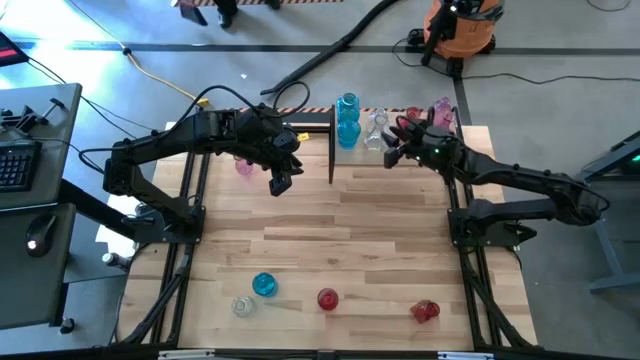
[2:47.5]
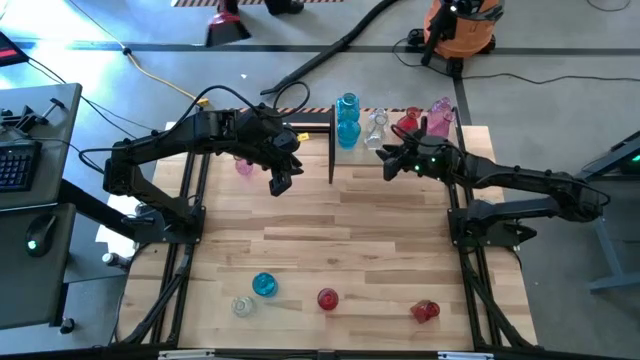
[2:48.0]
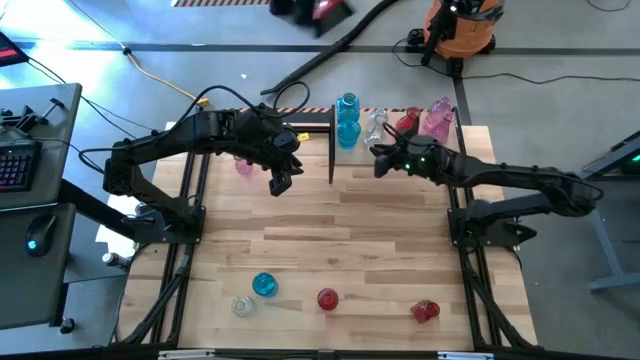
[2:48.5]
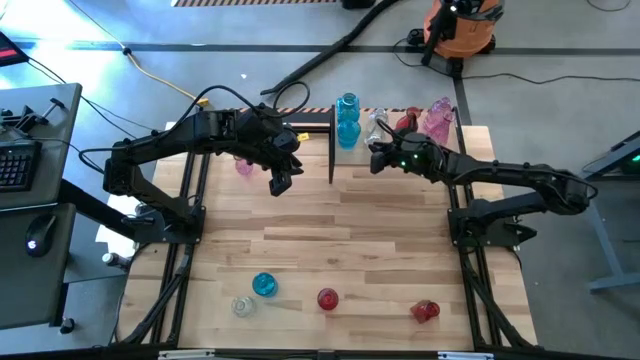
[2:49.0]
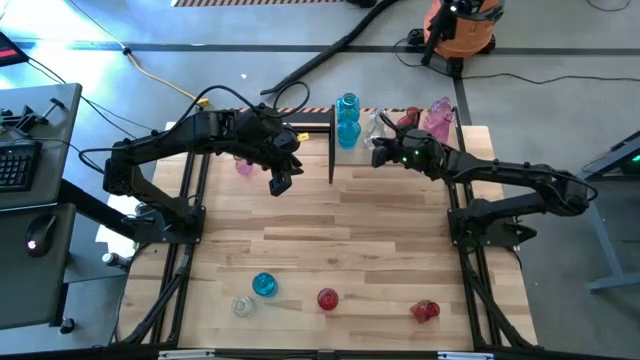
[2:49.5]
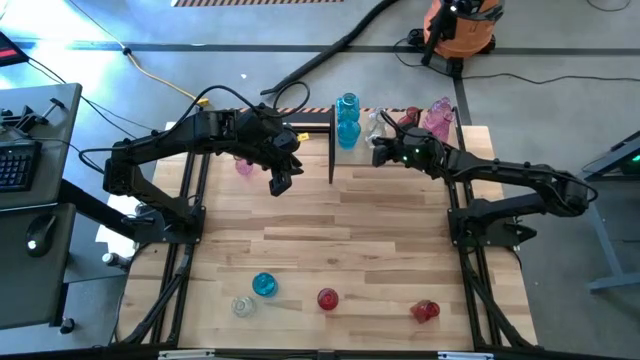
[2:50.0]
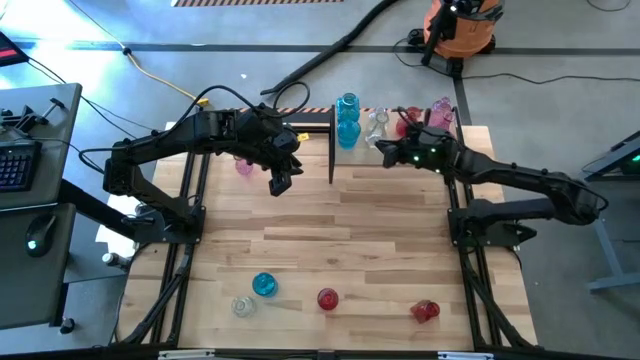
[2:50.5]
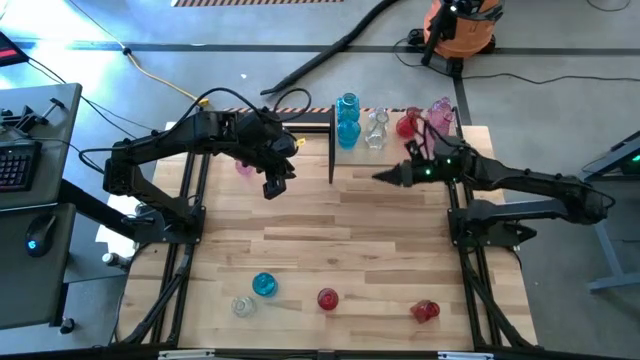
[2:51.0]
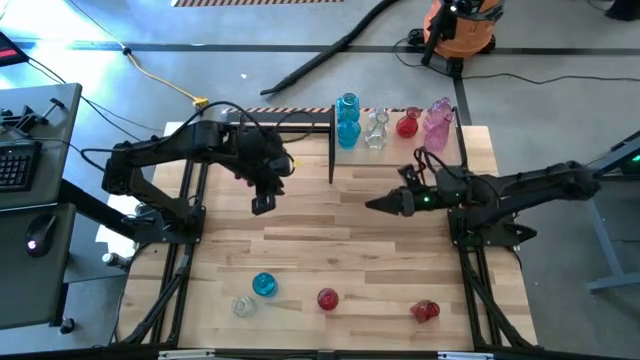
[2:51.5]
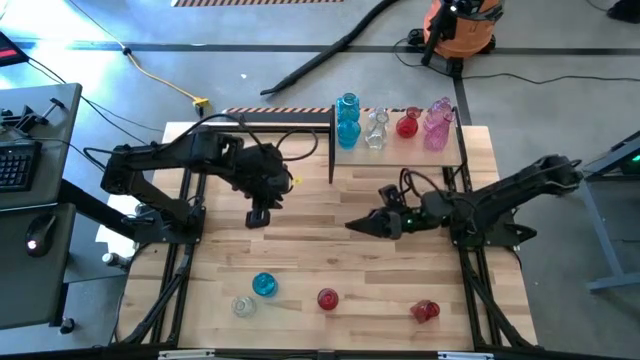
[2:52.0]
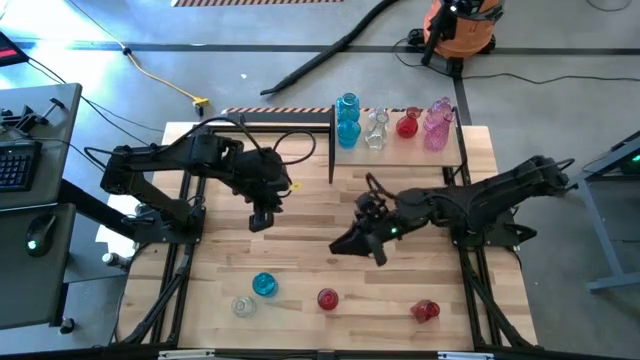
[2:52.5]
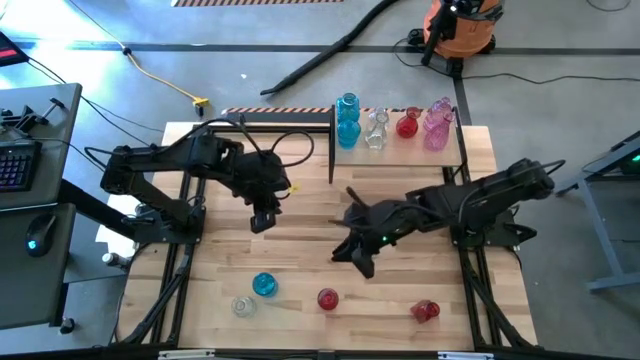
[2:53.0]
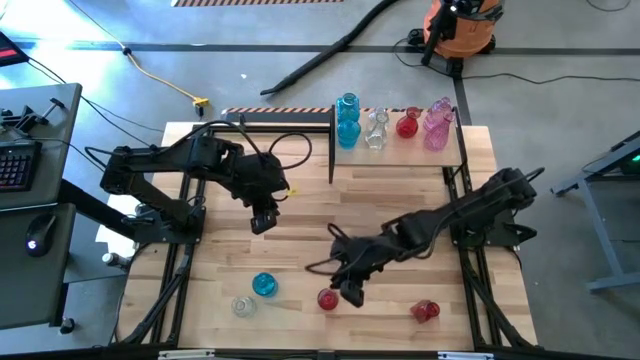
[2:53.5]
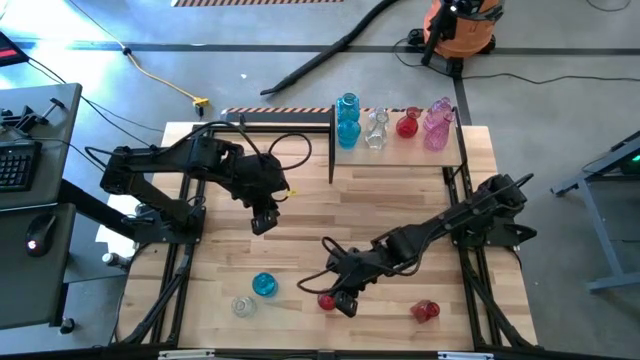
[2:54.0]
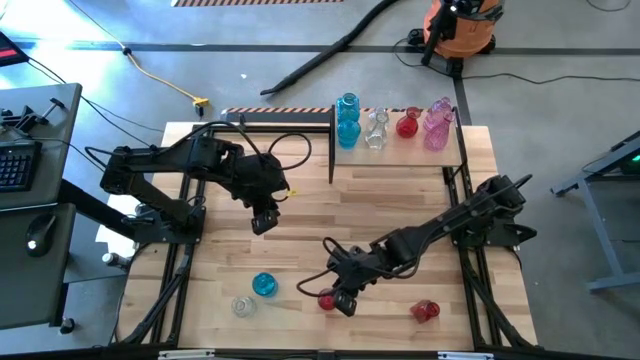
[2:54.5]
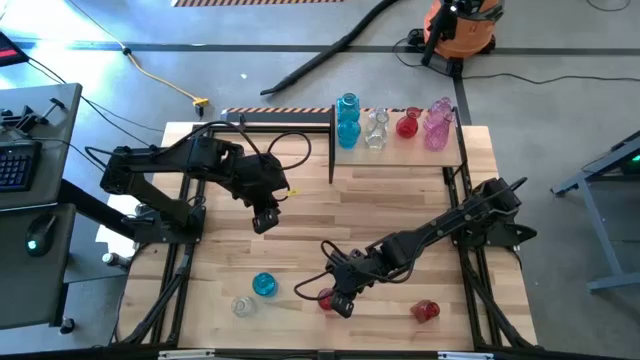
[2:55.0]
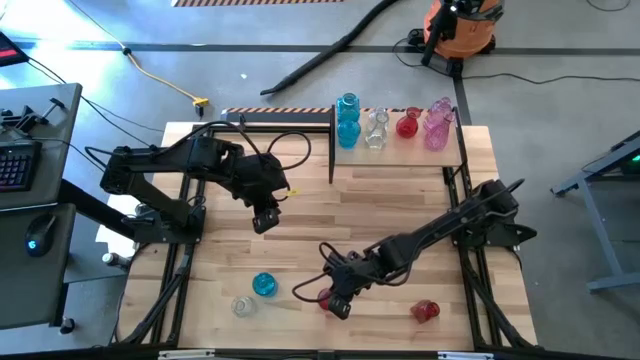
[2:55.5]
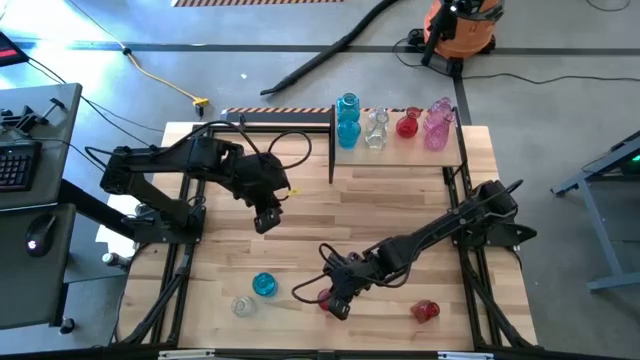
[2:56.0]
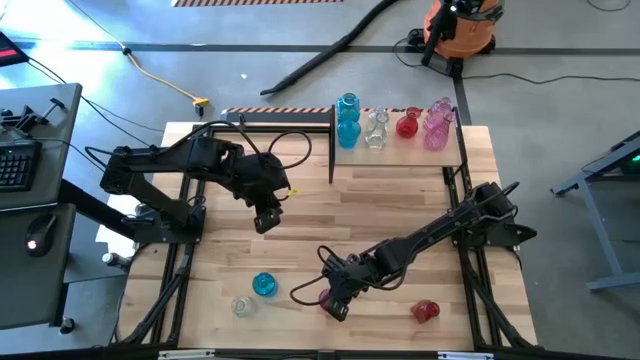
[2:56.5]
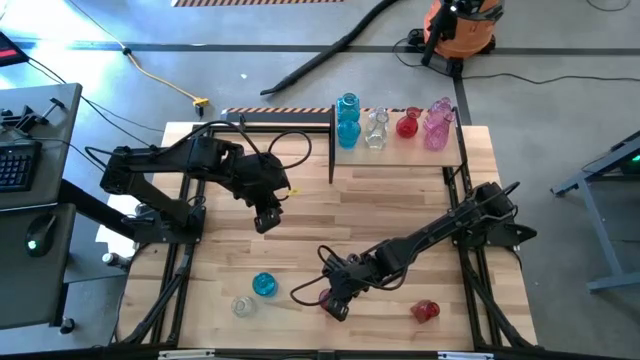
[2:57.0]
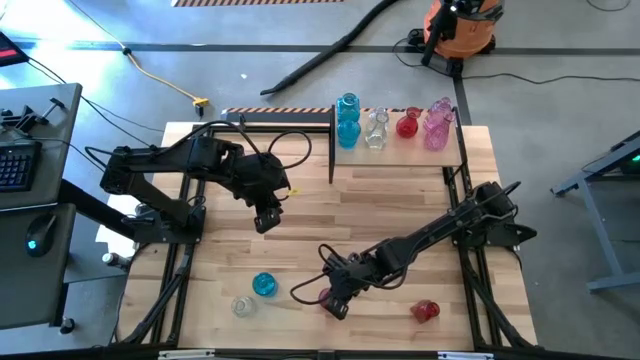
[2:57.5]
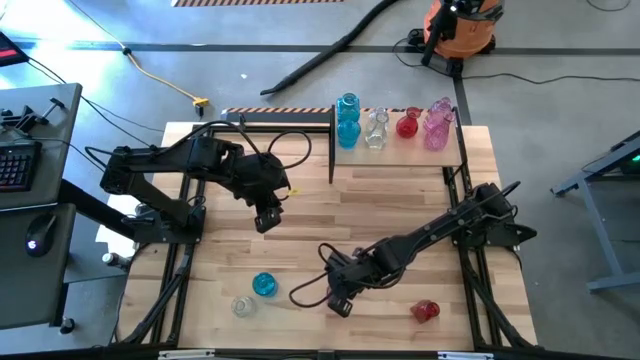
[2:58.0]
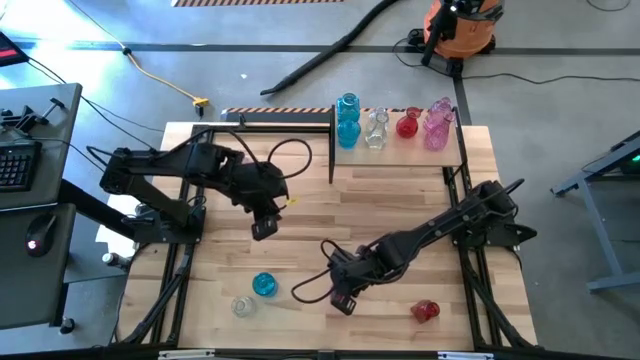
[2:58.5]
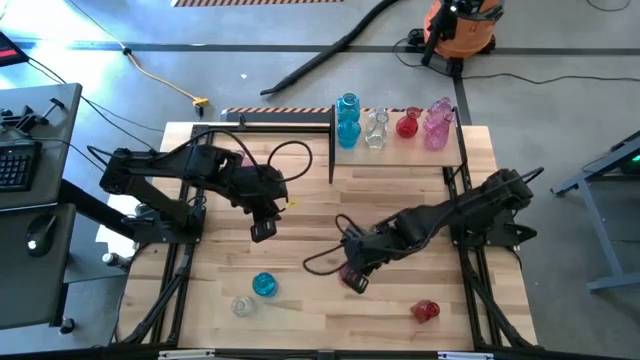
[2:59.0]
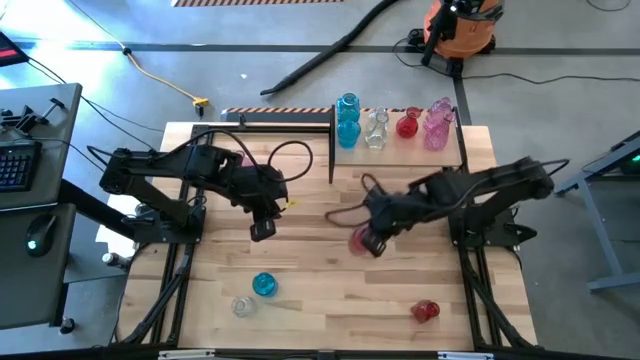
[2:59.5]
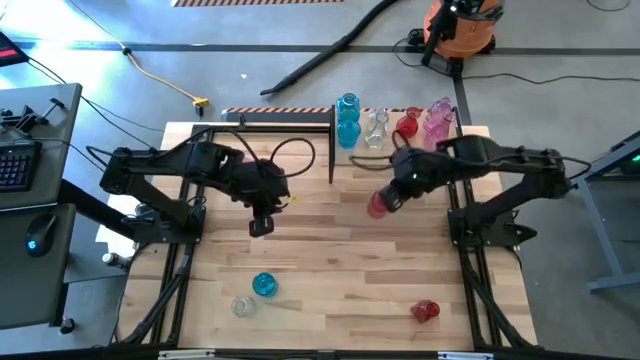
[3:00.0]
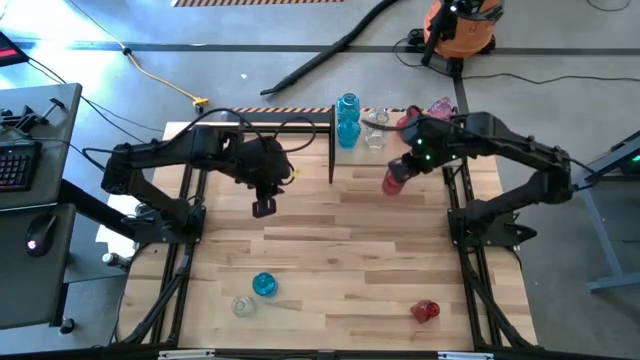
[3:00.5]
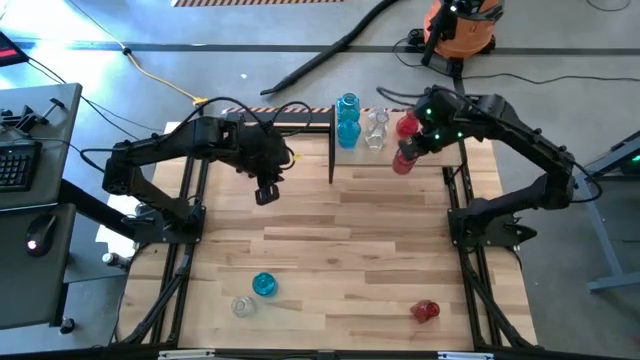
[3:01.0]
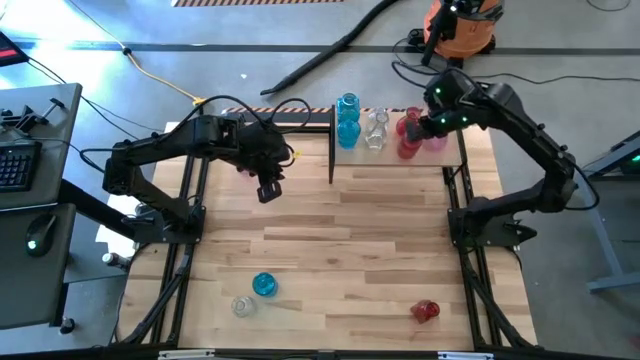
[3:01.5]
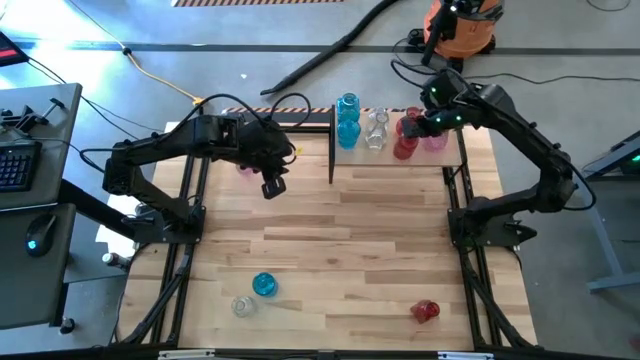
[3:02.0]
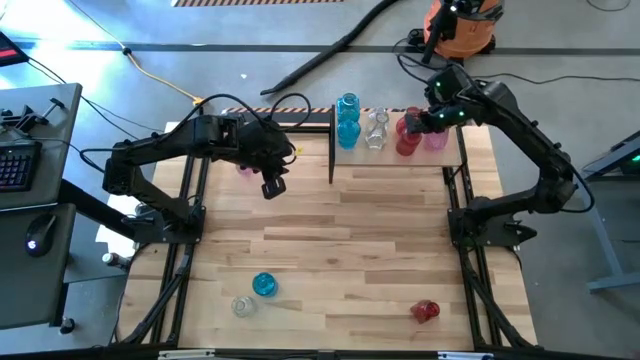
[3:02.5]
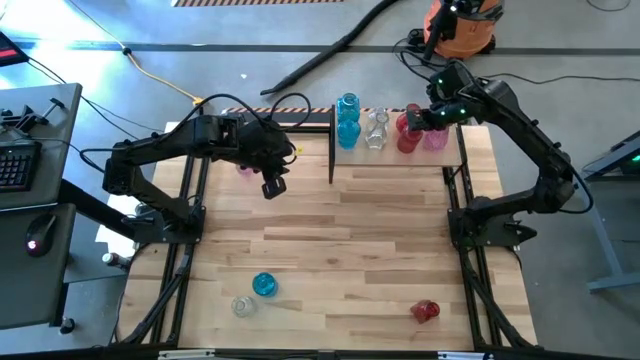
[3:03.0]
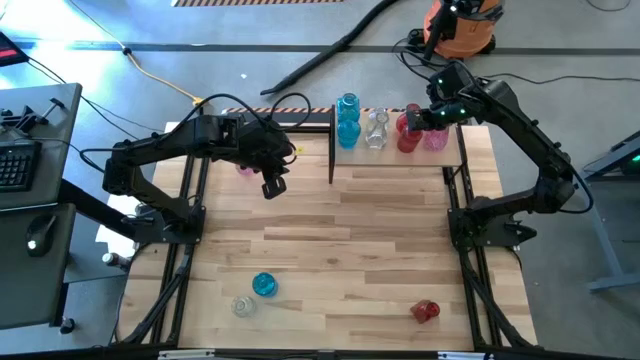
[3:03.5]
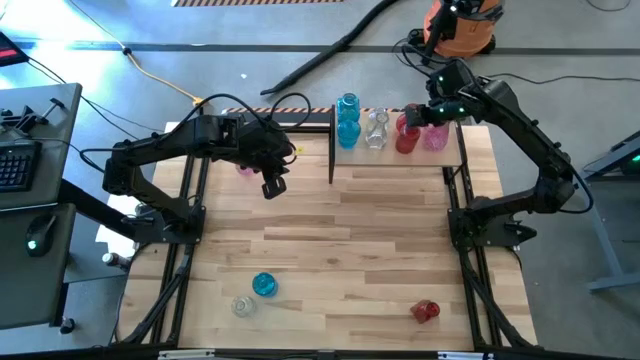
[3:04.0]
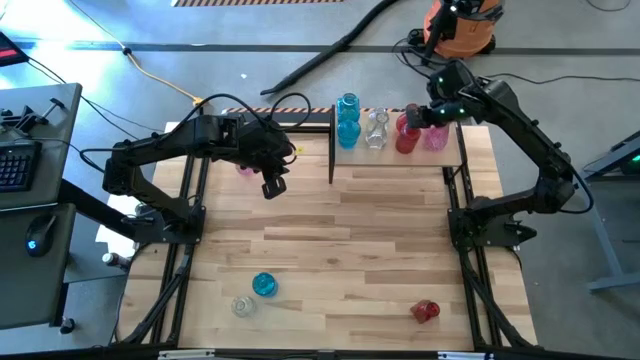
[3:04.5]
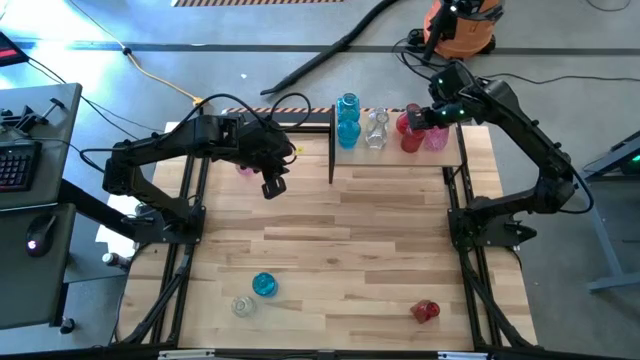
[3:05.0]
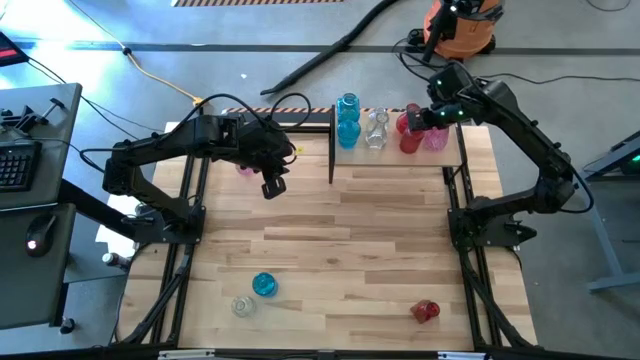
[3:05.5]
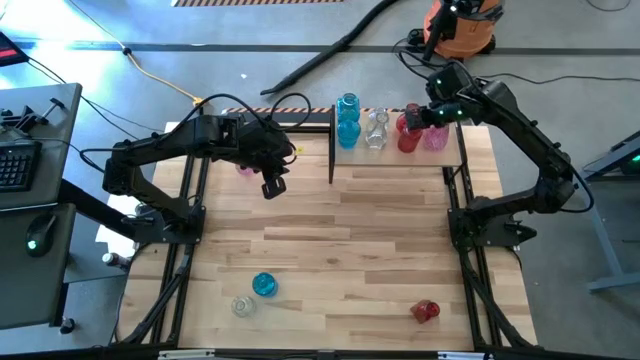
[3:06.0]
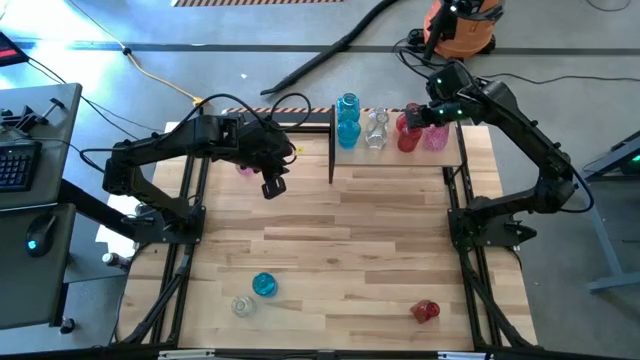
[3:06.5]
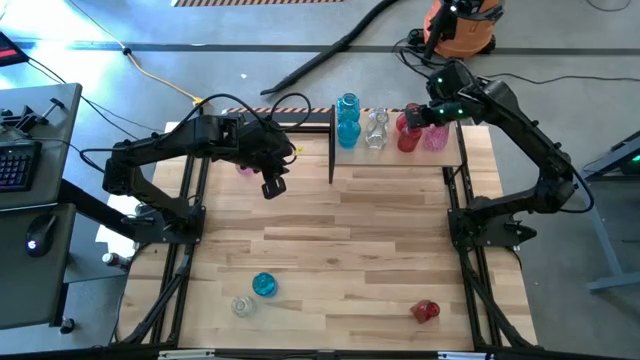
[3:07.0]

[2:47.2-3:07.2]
Task: sort vases onto shelf
Put the left red vase on the shelf aligned with the other red vase

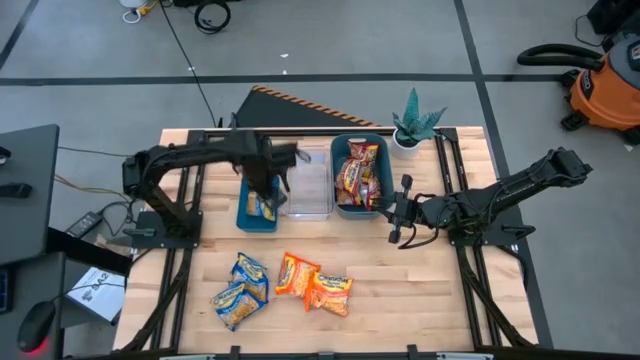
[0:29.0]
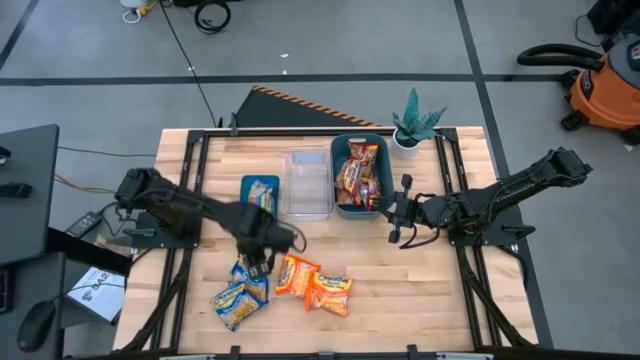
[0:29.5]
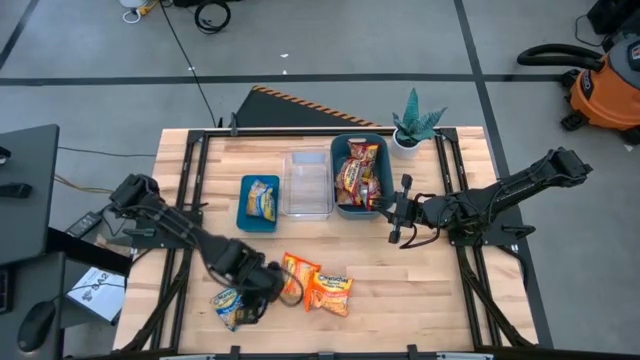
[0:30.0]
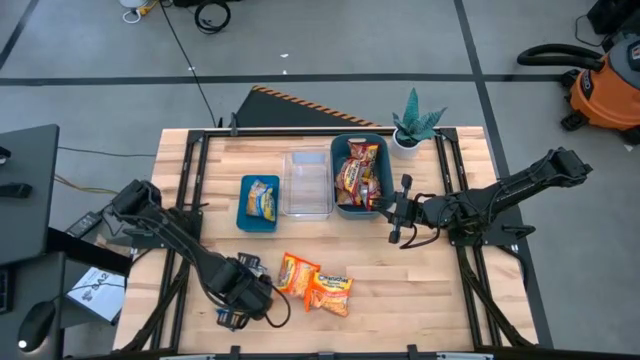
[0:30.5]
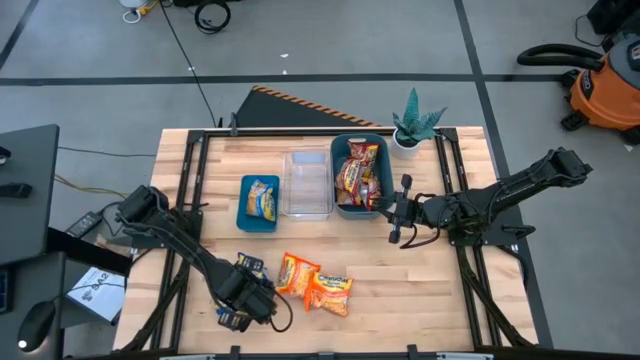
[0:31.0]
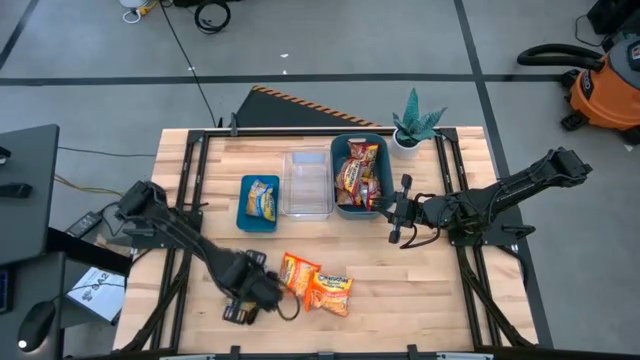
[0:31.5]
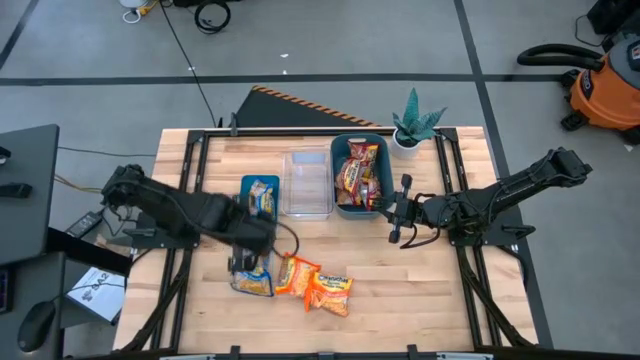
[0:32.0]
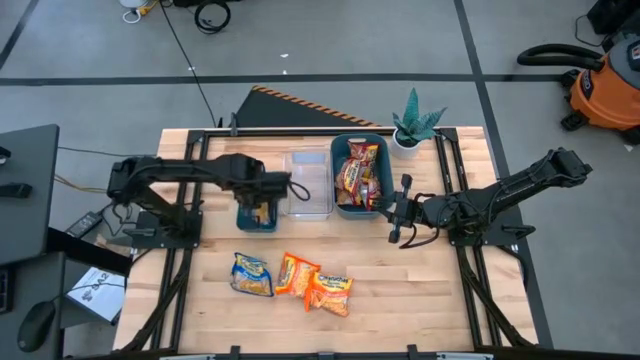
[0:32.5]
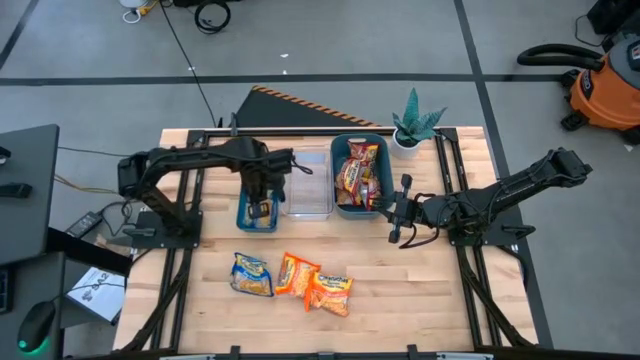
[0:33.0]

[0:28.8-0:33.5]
Task: Sort Maruchan noodles
Put the blue noodle pack into the blue bin
